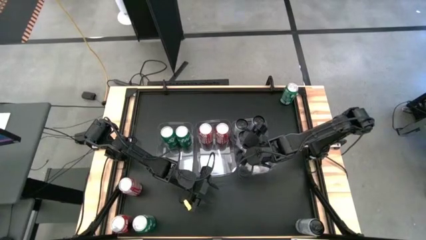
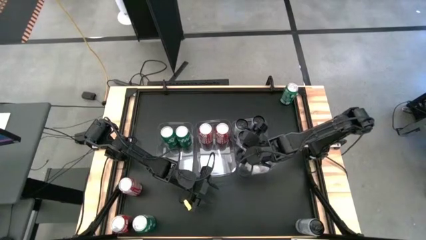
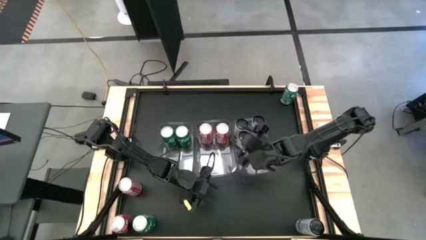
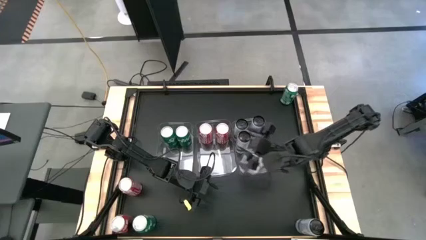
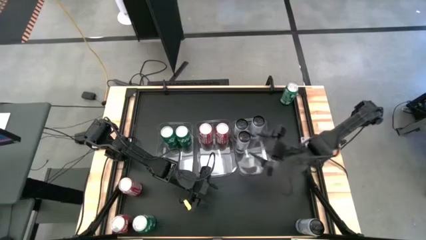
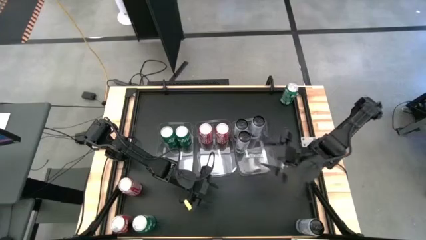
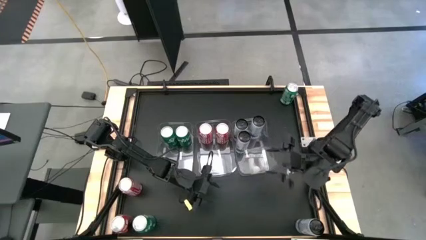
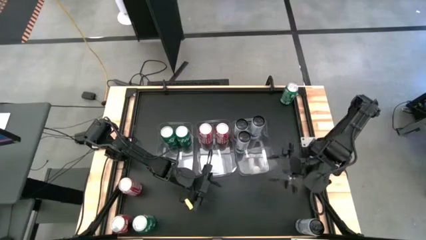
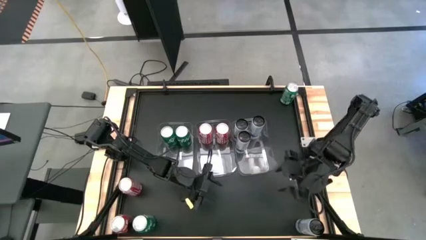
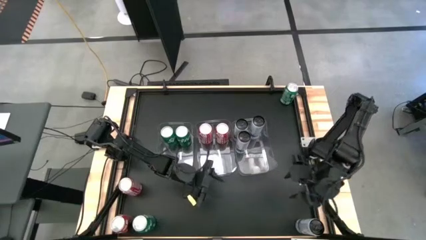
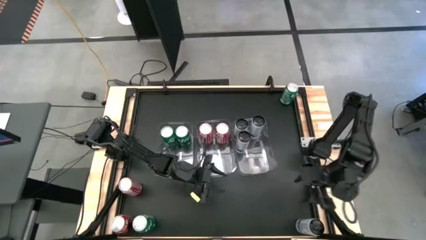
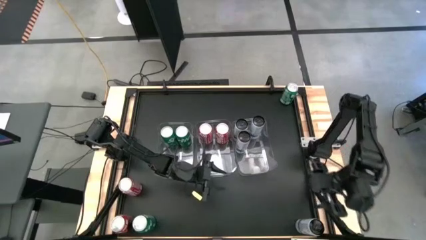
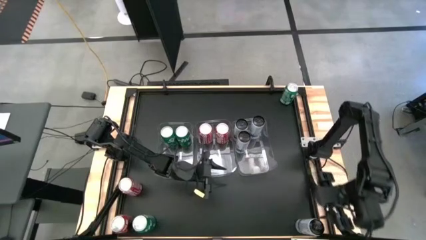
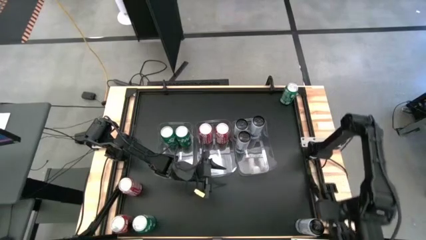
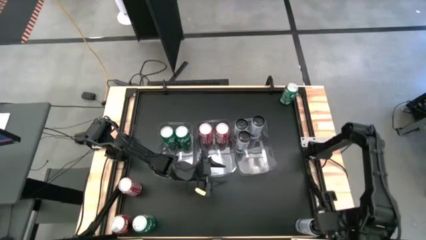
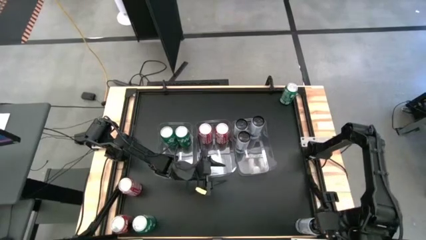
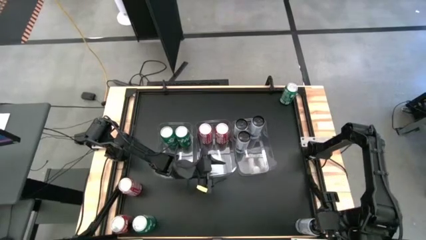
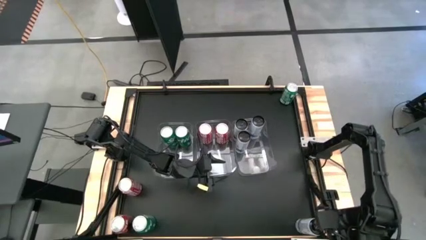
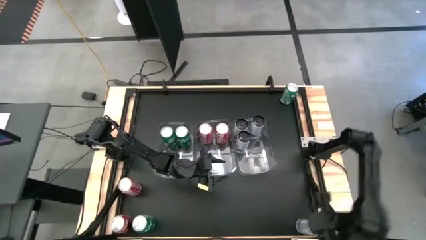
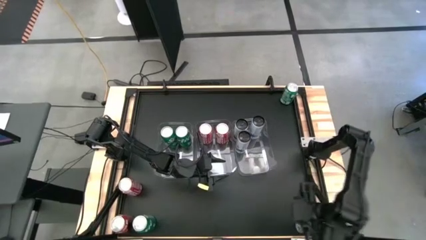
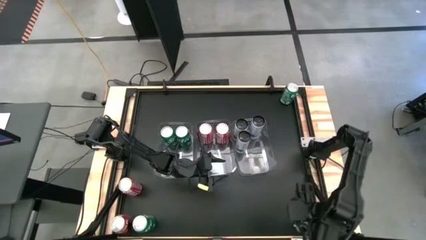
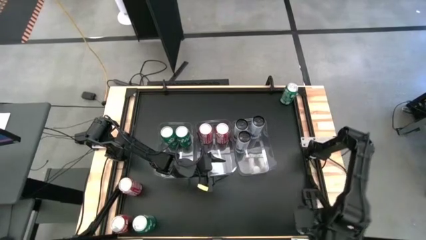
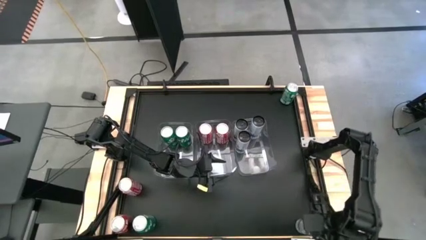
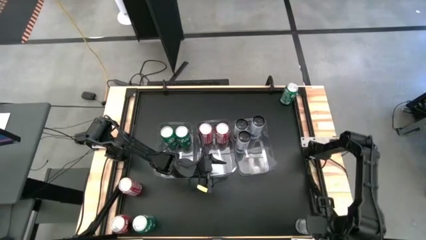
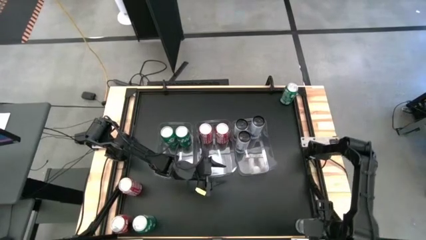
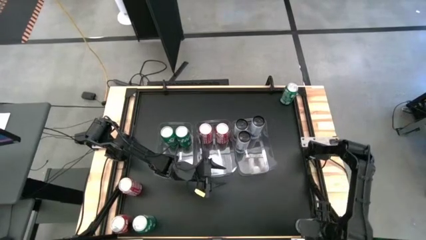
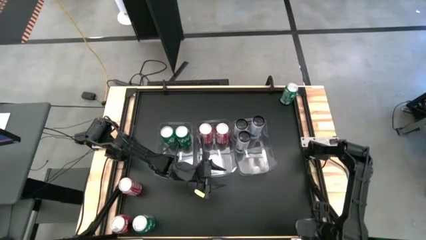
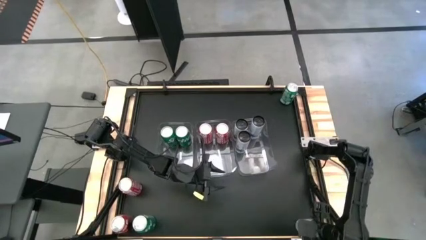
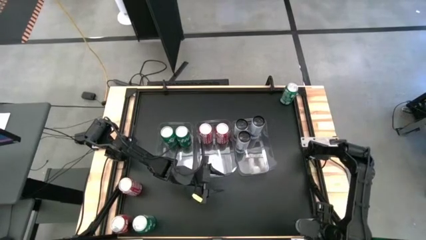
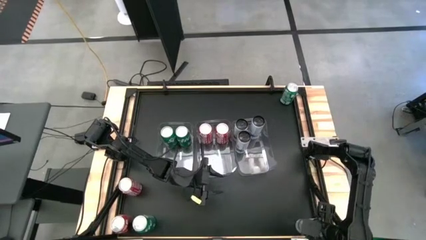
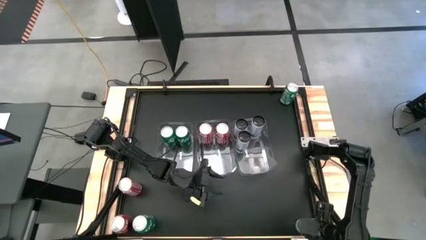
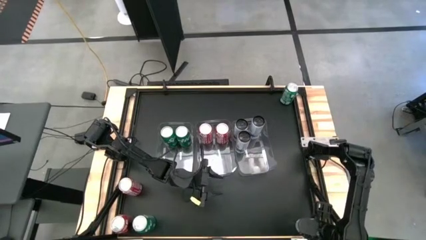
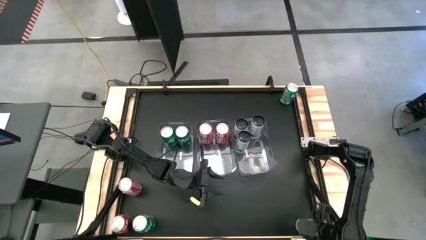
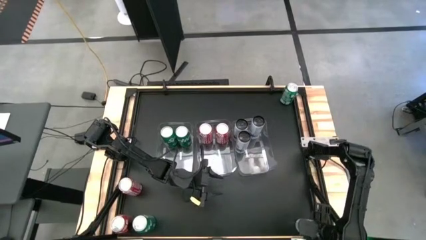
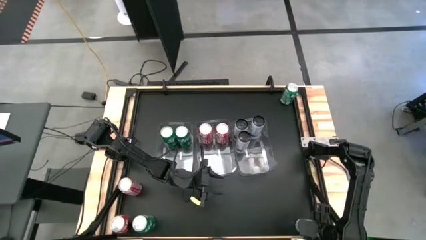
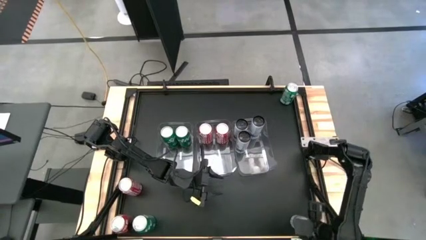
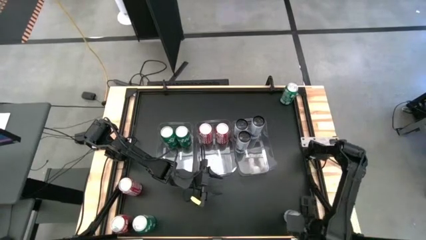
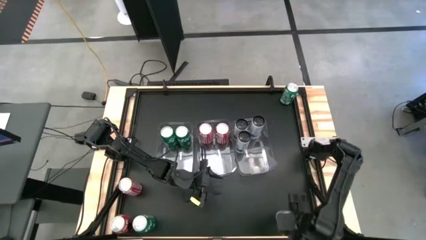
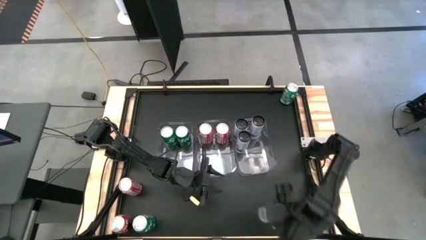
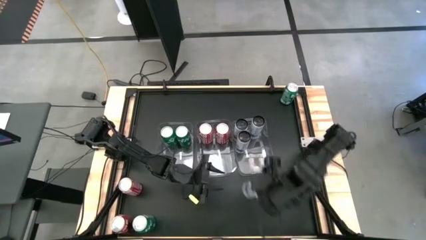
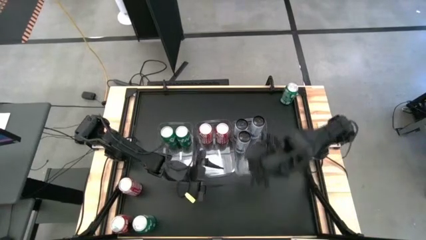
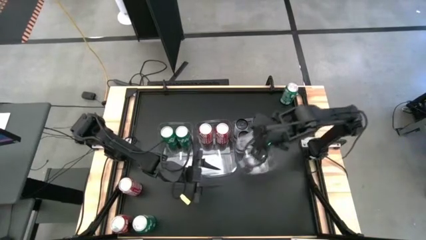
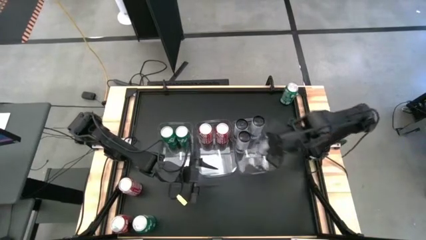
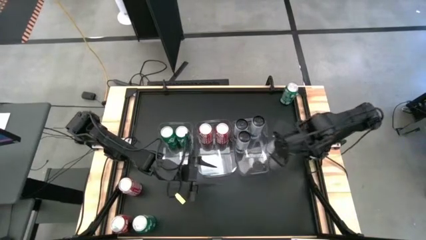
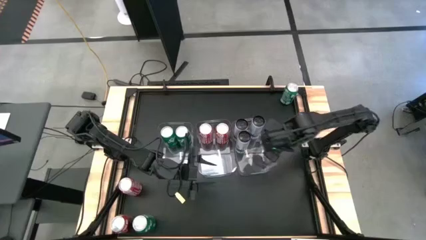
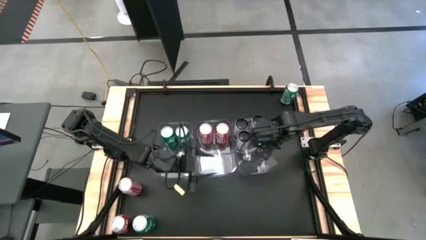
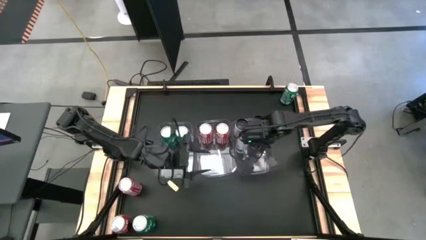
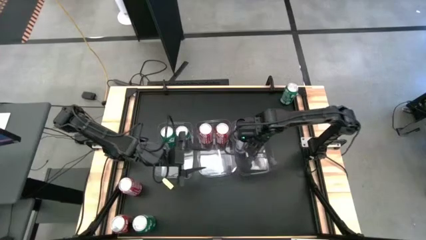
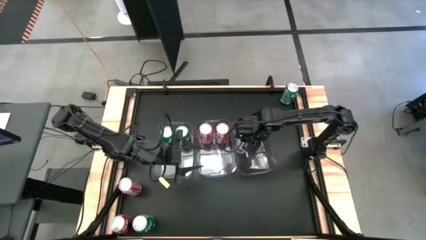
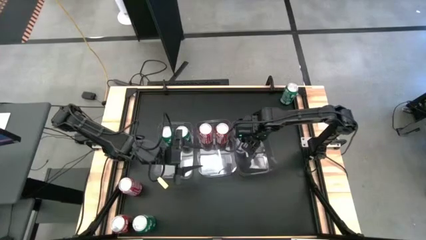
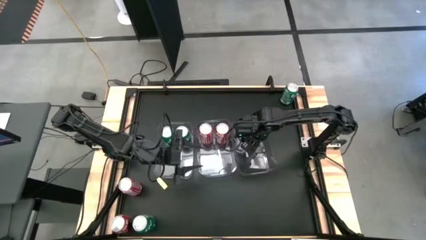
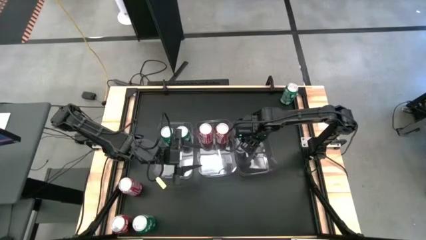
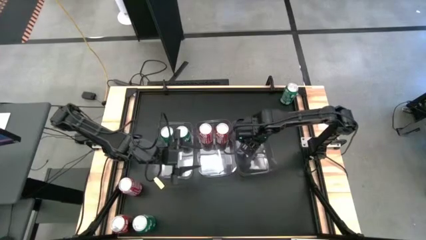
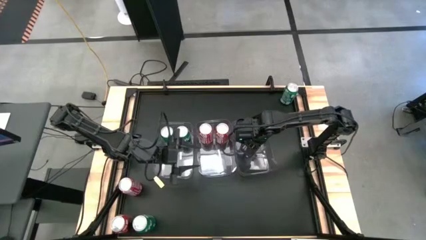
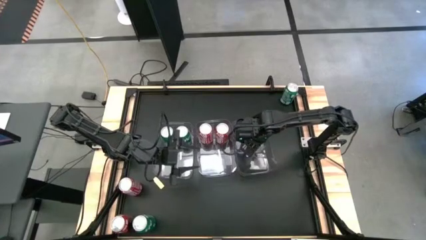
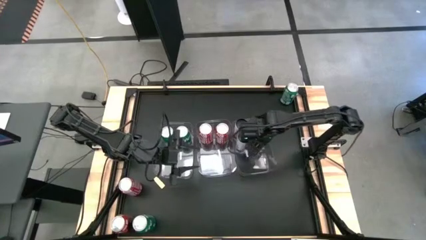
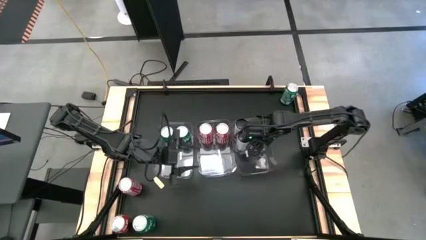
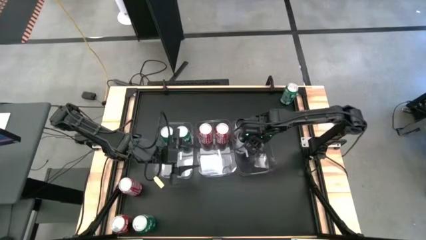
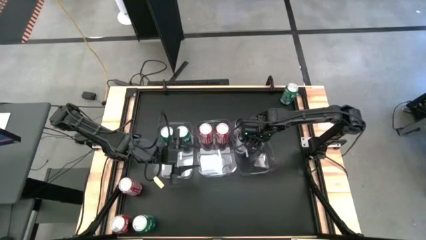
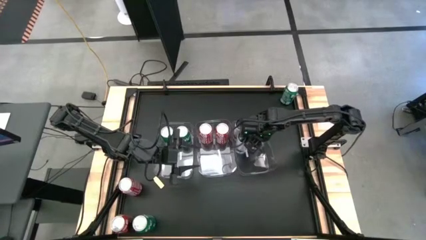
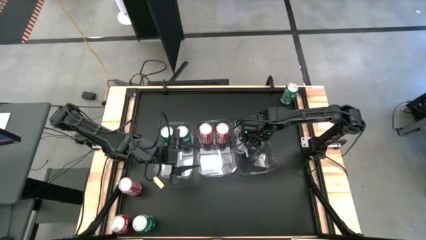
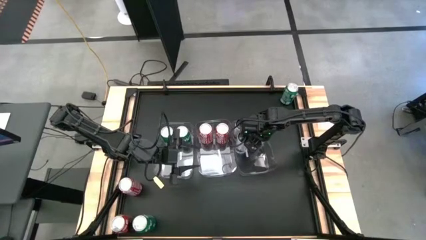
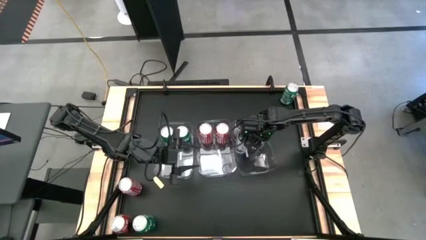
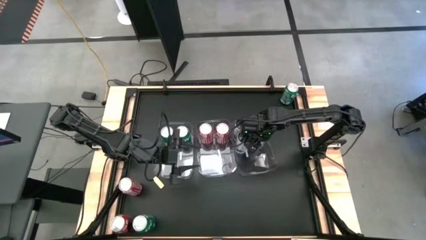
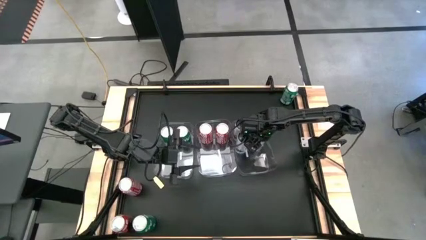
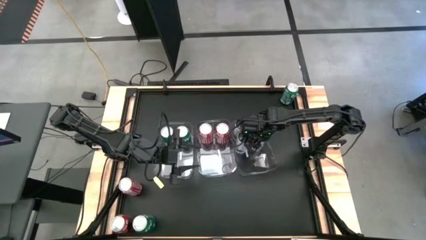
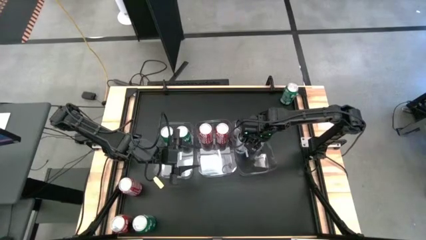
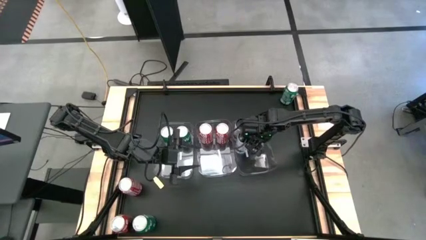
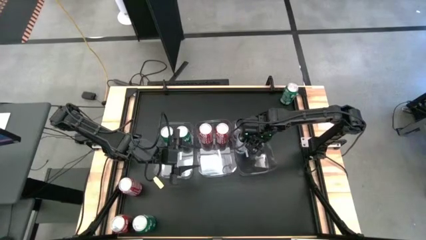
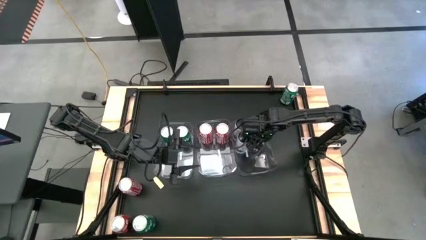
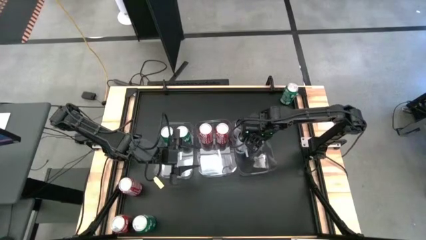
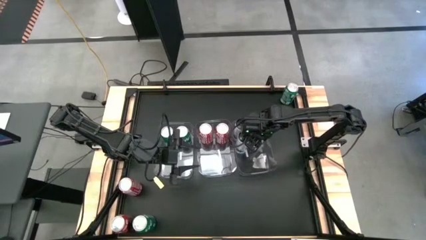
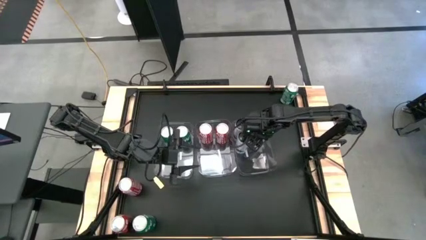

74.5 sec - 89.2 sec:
Task: Sort soda cans
Put the white-blue soda can into the right transparent bin
